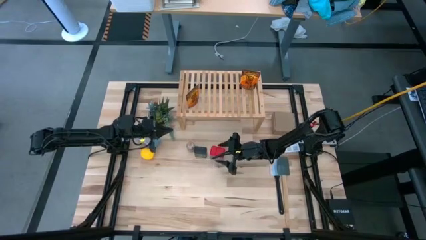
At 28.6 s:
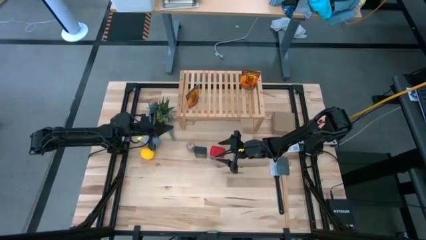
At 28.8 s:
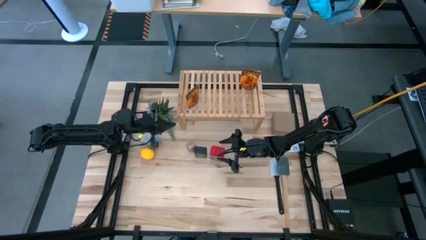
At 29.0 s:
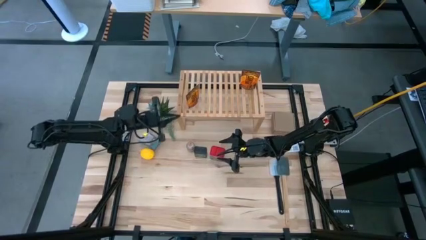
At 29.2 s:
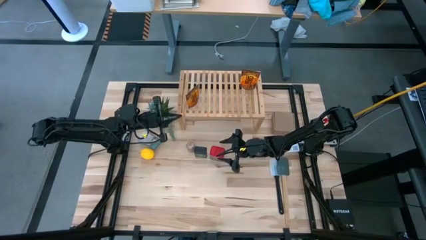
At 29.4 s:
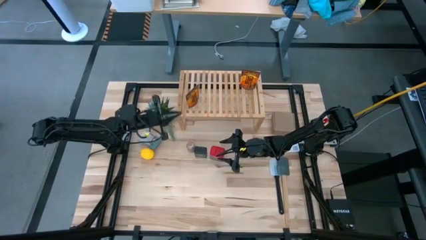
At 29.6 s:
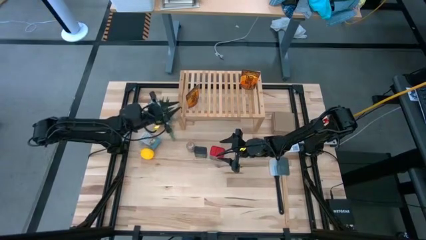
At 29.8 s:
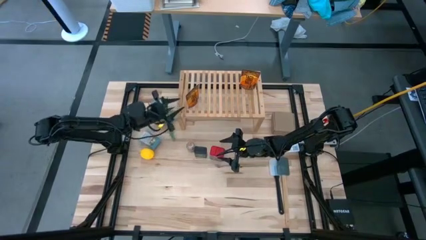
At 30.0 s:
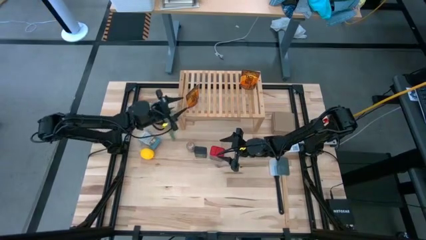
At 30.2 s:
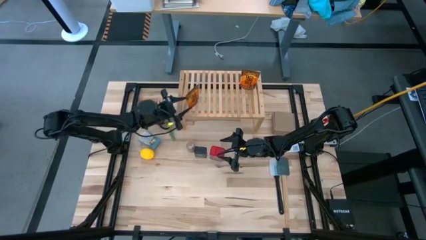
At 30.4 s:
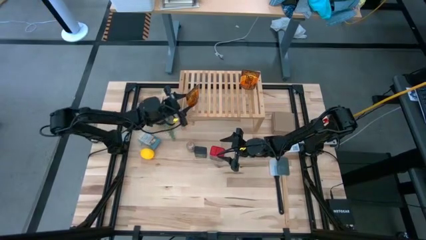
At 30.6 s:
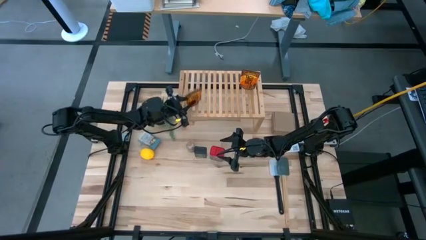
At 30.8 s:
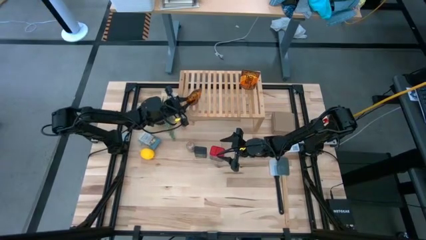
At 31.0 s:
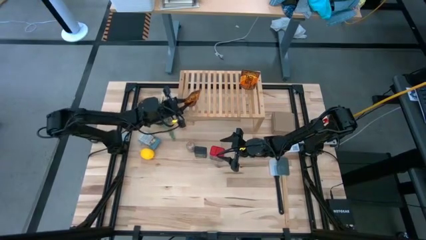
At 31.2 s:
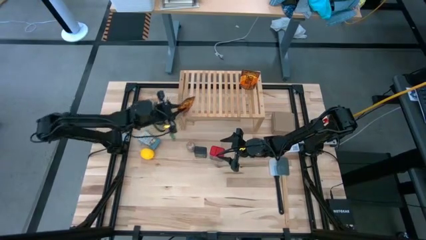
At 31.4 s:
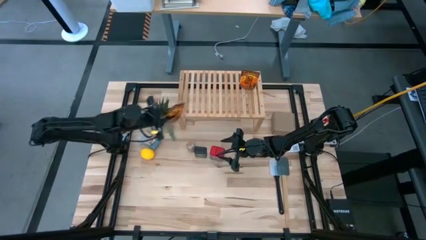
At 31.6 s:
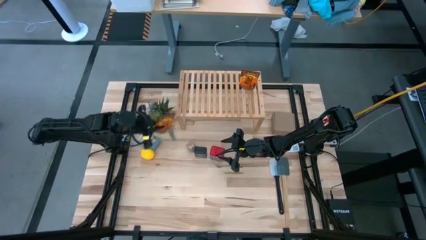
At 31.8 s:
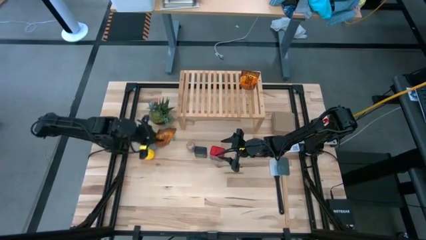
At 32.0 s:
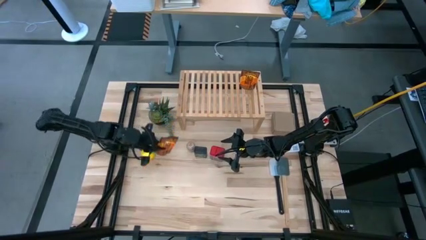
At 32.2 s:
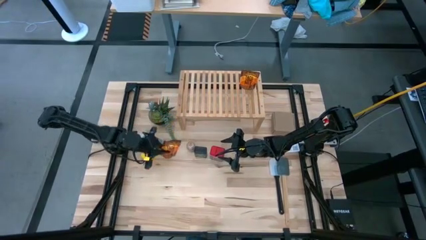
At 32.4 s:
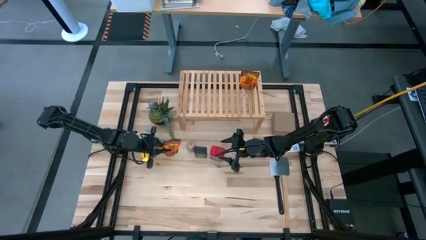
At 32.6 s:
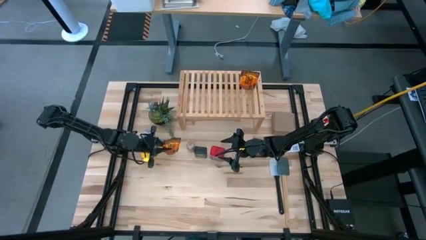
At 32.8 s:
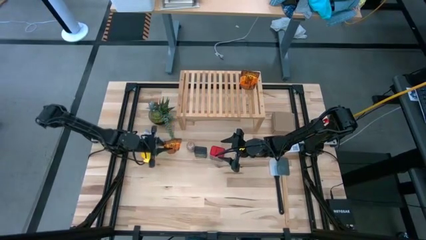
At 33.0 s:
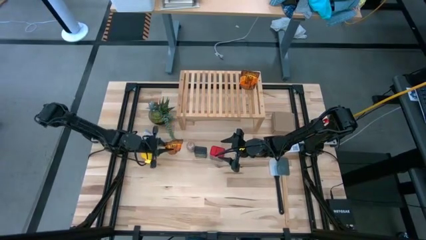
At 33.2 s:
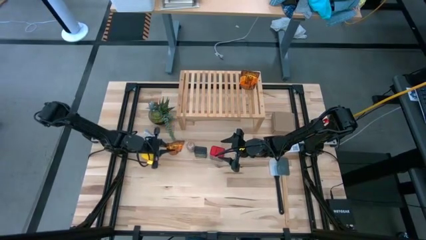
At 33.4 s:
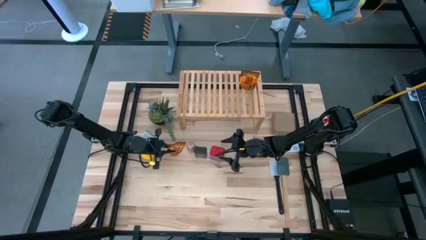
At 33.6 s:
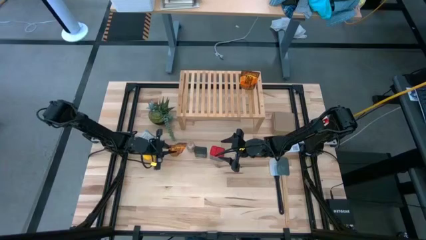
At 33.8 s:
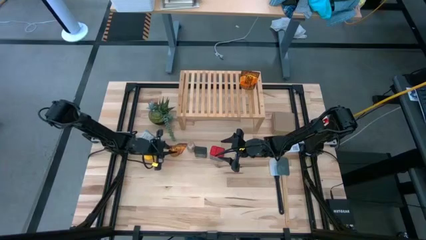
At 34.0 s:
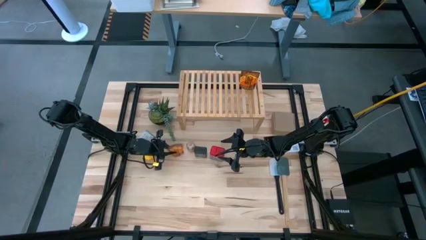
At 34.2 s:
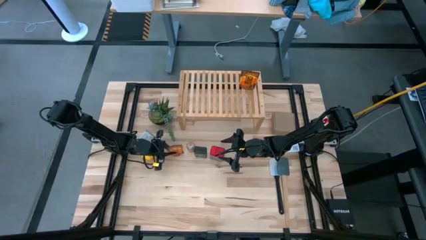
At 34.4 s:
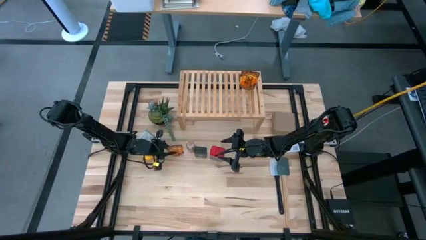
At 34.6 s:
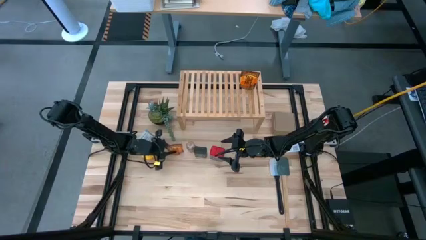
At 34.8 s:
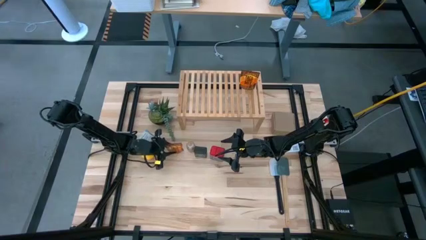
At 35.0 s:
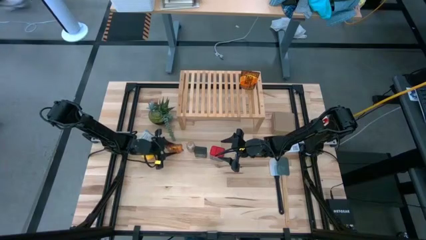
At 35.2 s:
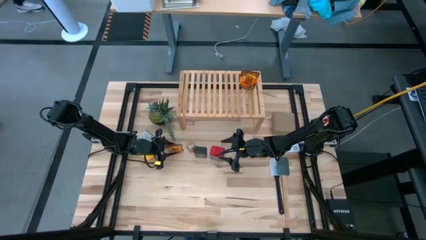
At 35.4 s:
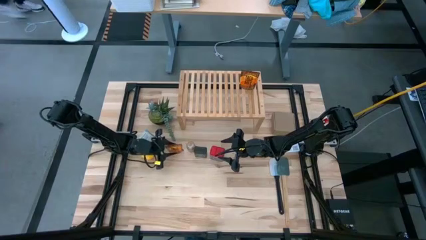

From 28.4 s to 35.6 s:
Task: Shelf spices
Remove the orange seasoning pack from the shelf

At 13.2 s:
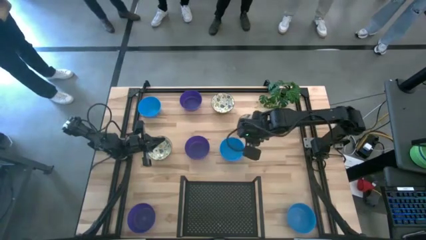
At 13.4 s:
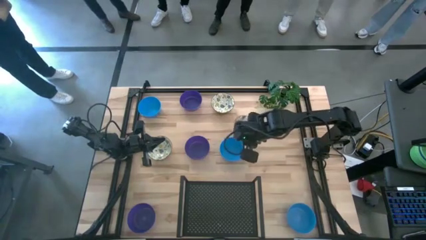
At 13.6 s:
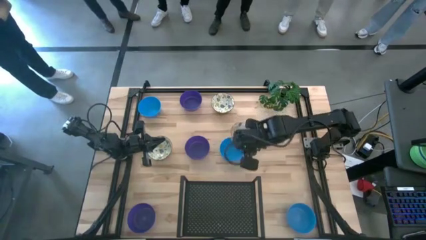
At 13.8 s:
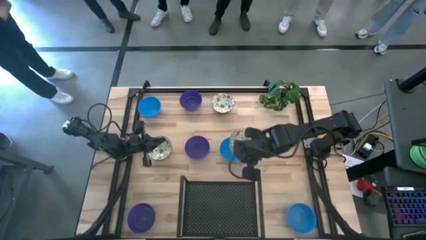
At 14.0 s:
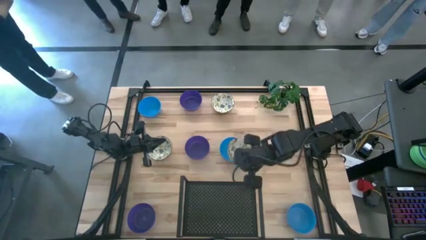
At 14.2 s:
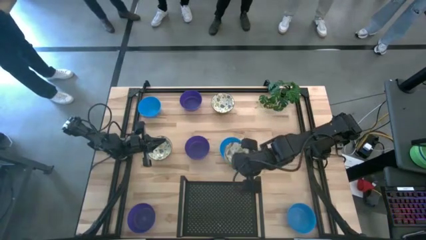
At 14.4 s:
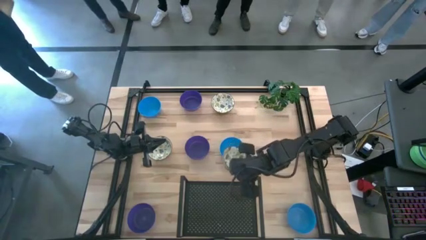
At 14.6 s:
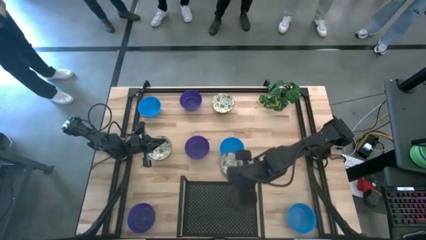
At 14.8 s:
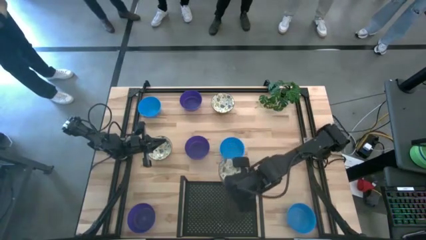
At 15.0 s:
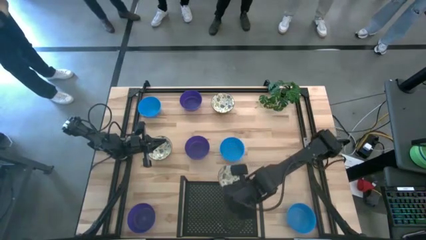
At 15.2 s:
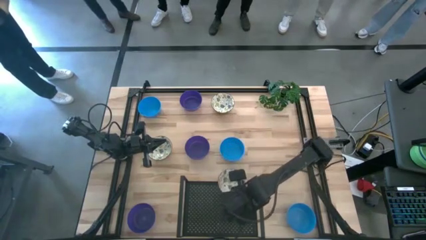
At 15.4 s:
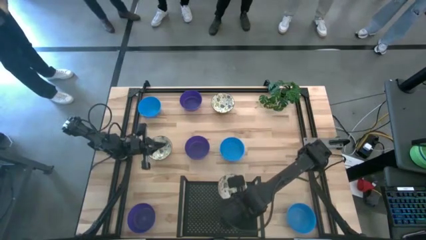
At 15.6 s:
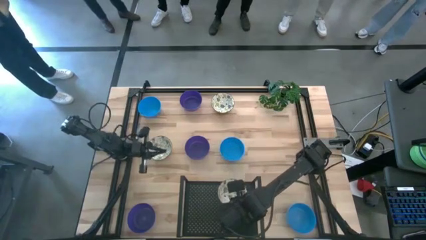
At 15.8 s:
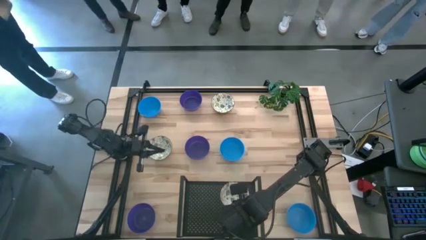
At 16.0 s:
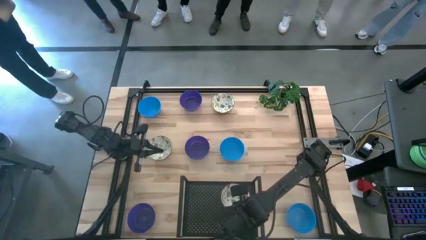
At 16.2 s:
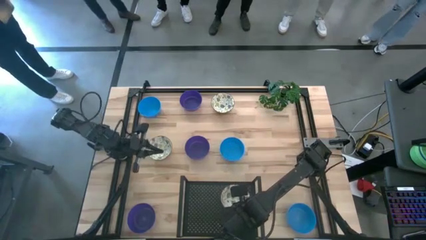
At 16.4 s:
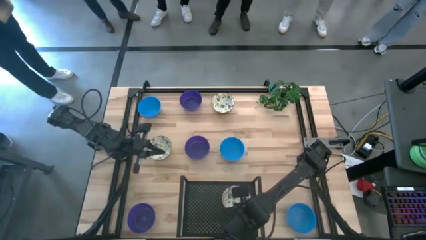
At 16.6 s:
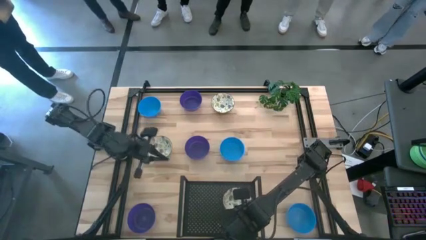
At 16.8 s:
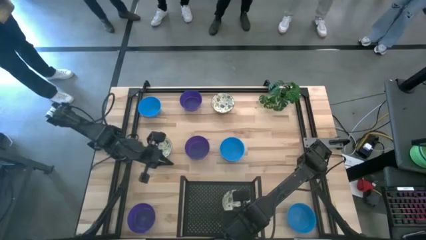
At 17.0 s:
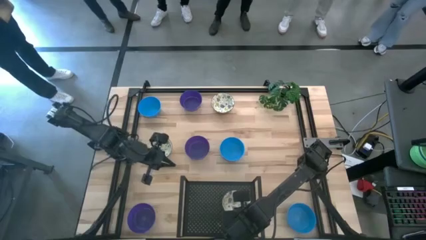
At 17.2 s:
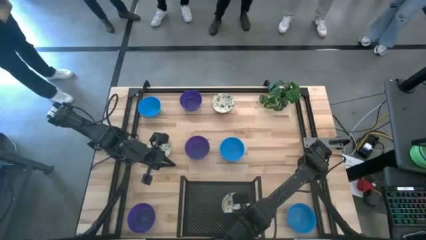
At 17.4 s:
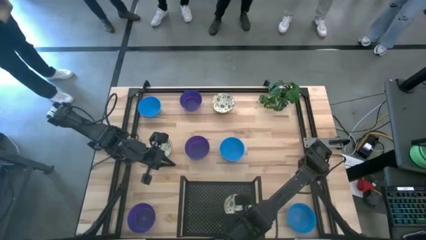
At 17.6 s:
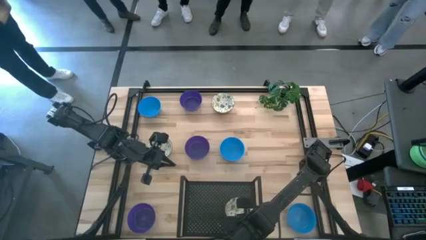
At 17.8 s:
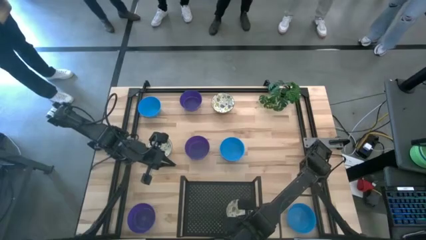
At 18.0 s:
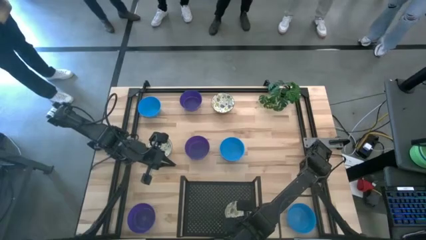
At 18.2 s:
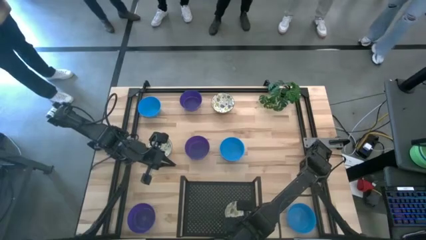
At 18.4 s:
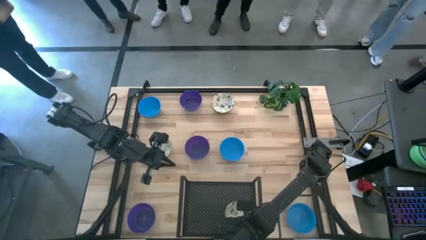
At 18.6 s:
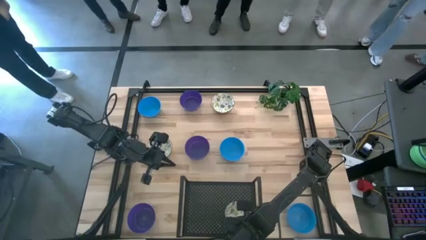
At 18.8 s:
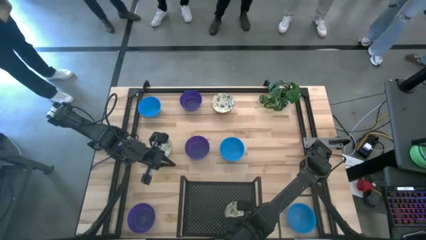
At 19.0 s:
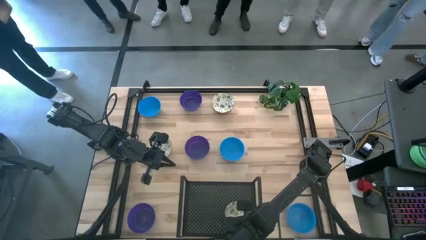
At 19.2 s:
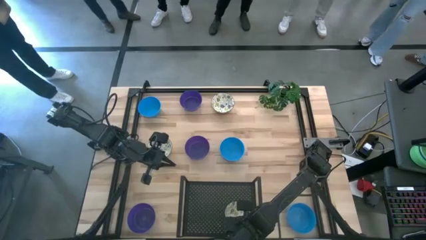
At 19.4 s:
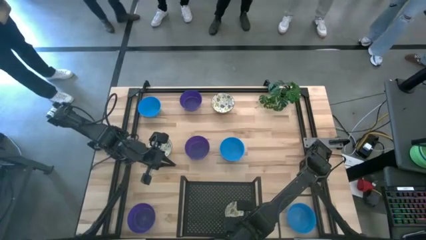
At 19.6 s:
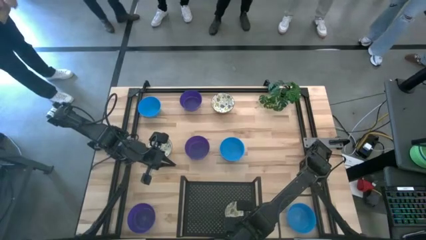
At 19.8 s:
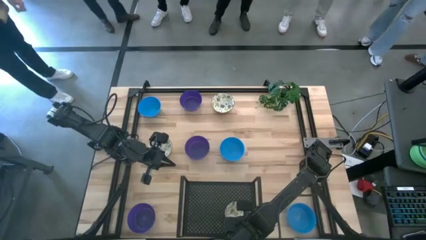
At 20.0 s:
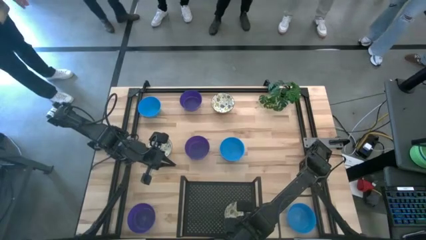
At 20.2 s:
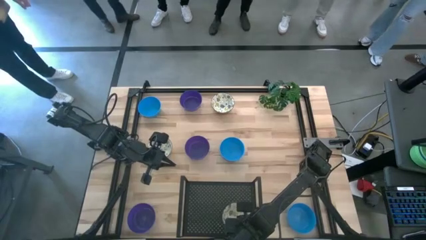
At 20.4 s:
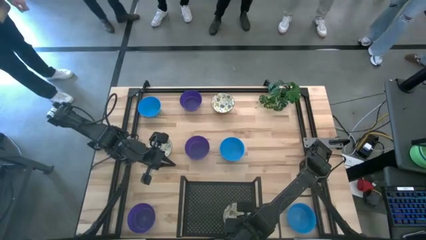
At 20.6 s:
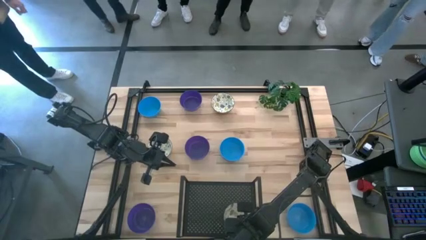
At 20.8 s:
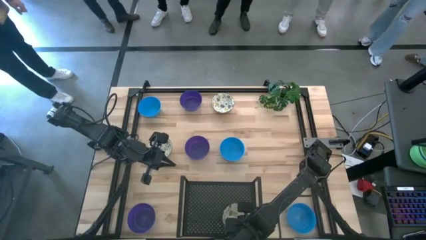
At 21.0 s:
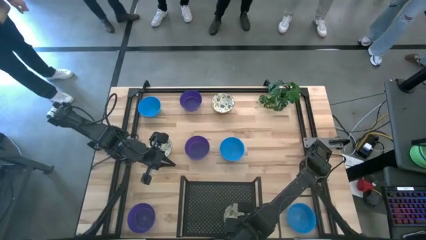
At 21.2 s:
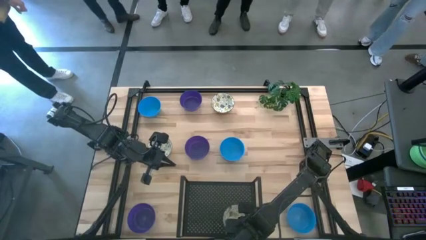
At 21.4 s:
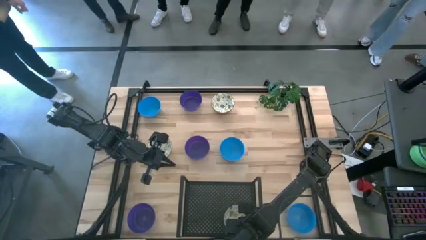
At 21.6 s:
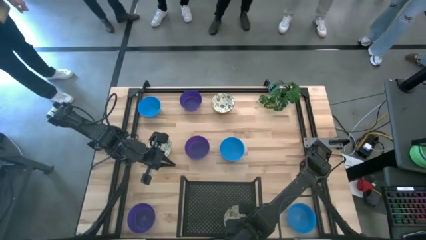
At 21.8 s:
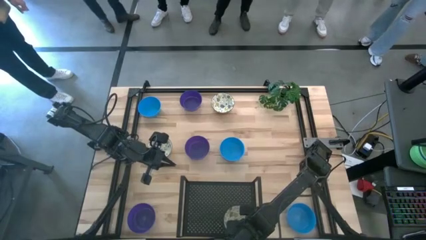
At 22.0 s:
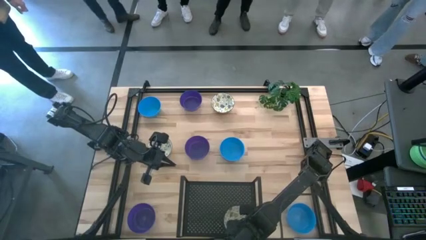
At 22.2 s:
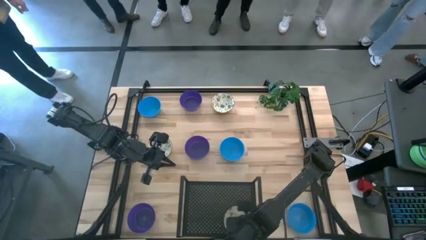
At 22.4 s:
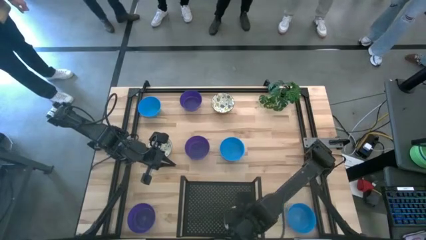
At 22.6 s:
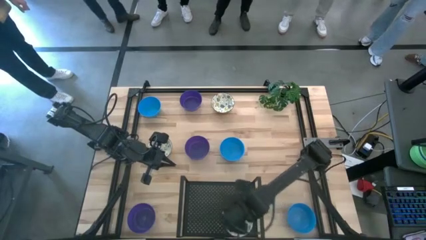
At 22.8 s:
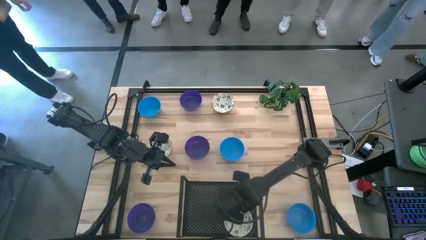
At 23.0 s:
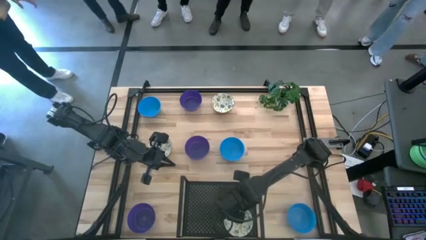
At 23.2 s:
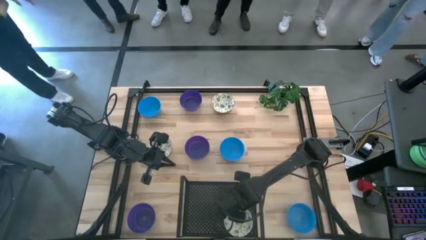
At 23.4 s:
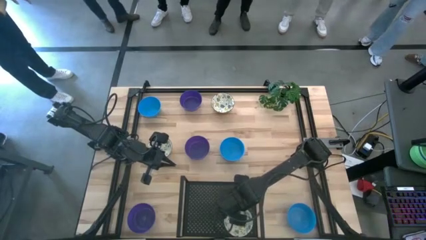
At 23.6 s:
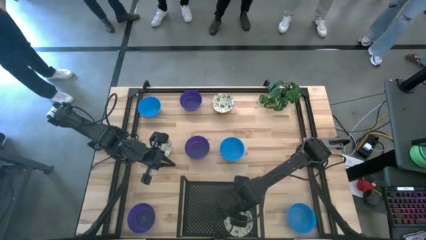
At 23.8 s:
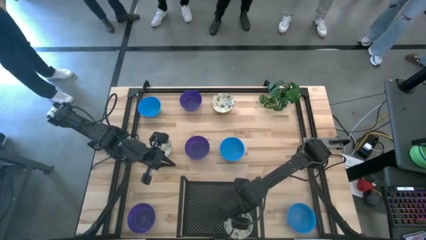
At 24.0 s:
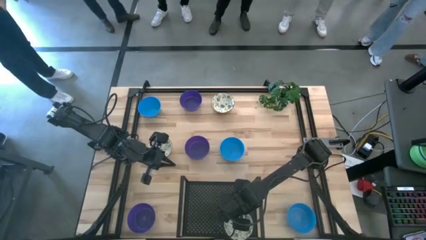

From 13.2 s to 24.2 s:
Task: Pick & Place Mini bowls
Put the right white patterned bowl on the shelf
